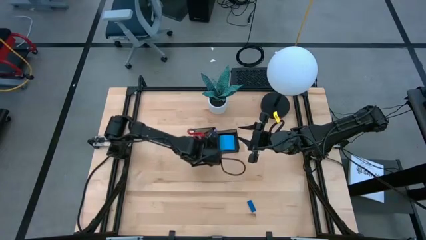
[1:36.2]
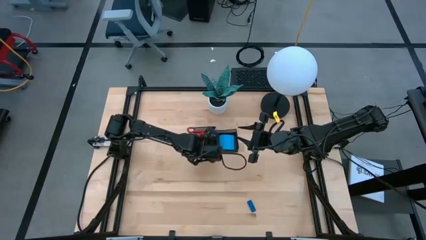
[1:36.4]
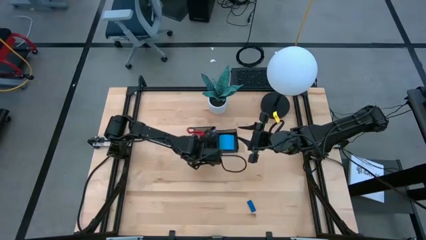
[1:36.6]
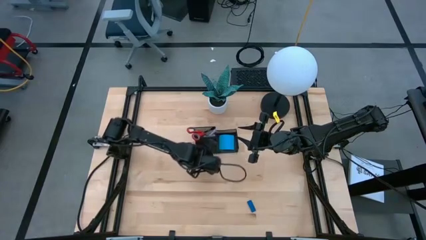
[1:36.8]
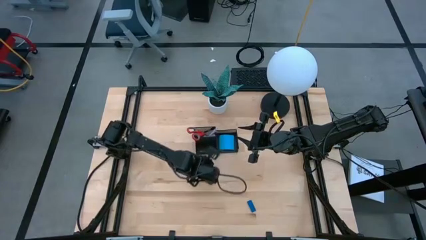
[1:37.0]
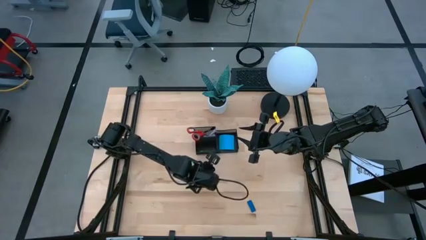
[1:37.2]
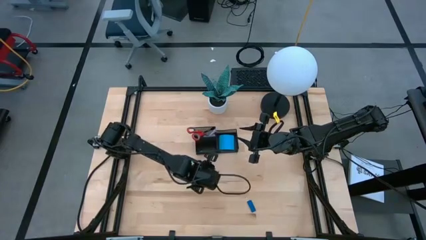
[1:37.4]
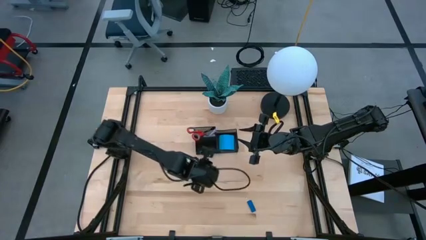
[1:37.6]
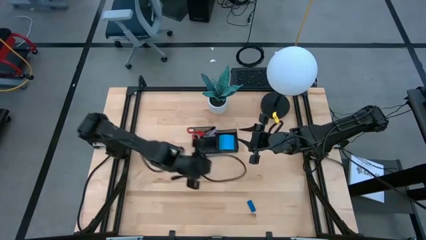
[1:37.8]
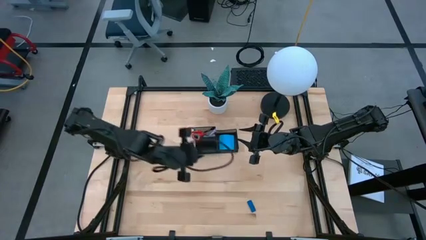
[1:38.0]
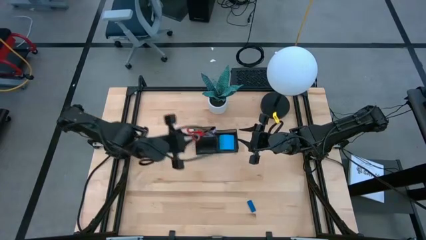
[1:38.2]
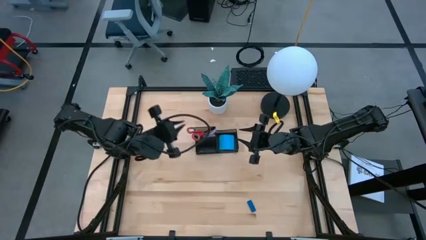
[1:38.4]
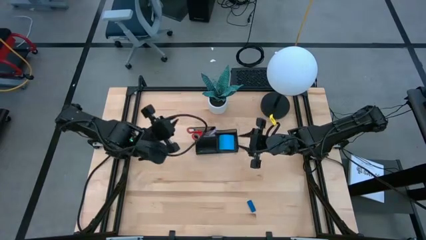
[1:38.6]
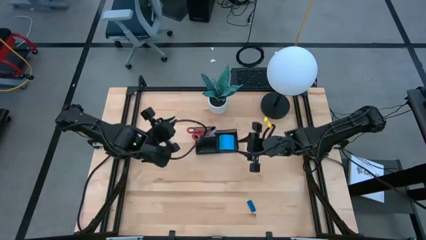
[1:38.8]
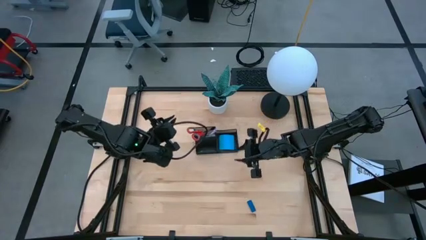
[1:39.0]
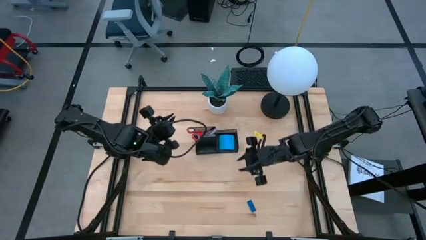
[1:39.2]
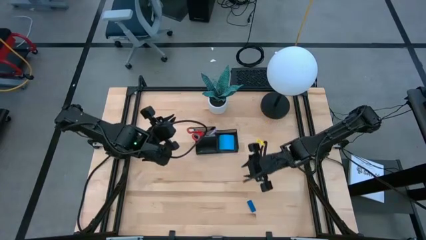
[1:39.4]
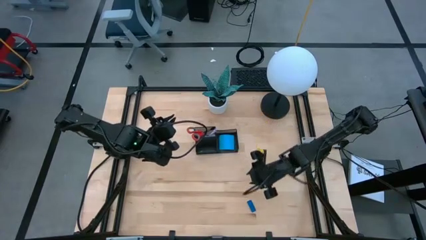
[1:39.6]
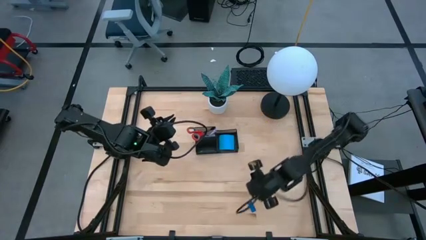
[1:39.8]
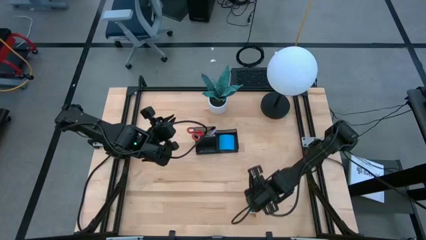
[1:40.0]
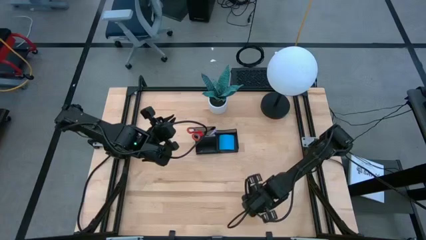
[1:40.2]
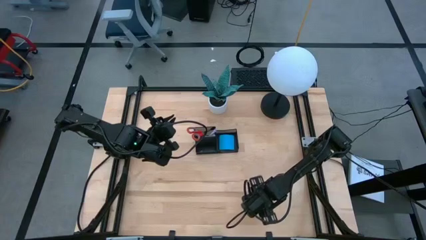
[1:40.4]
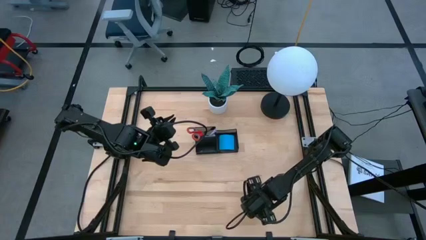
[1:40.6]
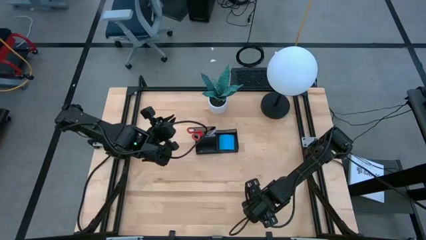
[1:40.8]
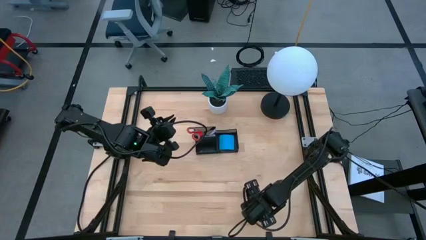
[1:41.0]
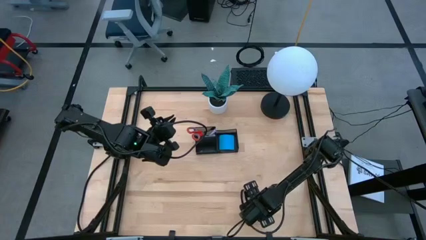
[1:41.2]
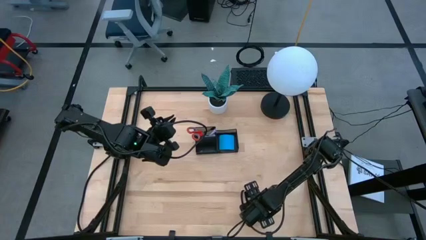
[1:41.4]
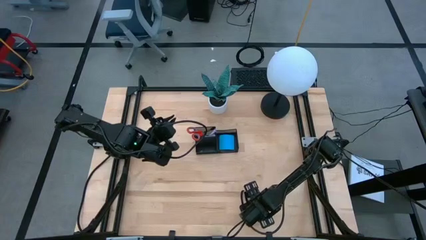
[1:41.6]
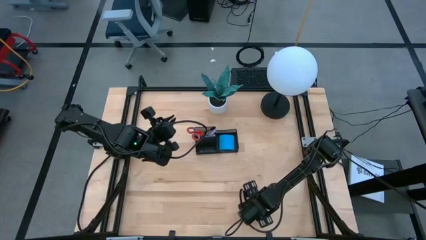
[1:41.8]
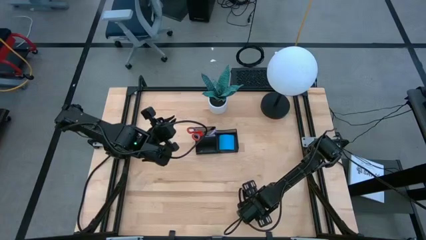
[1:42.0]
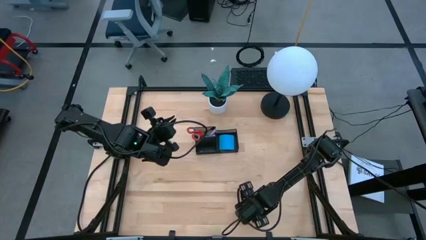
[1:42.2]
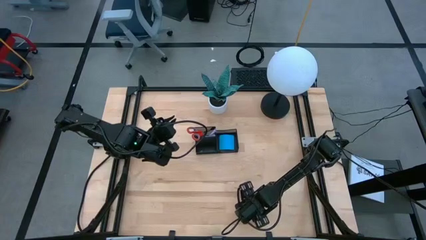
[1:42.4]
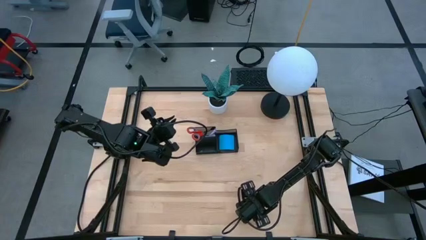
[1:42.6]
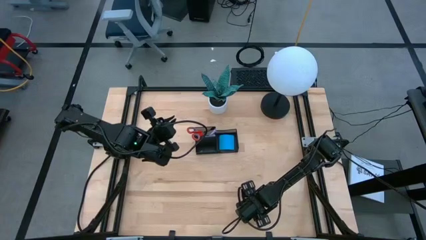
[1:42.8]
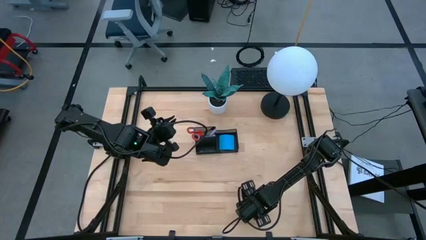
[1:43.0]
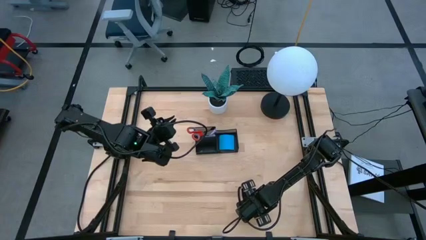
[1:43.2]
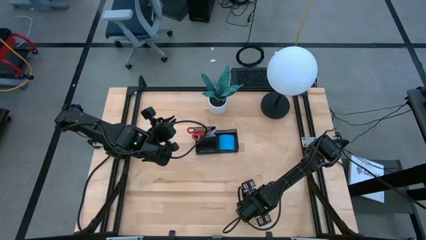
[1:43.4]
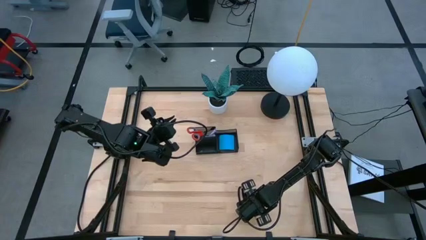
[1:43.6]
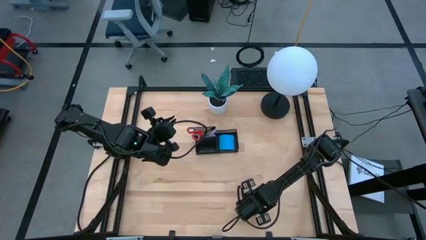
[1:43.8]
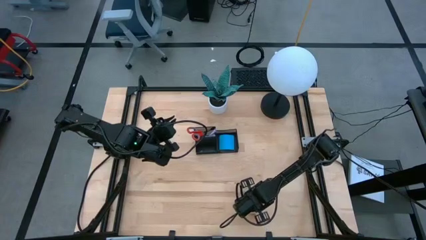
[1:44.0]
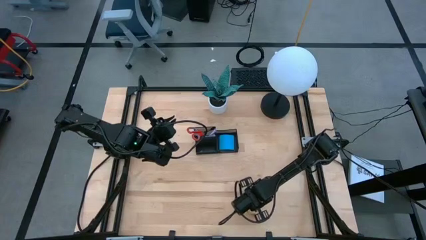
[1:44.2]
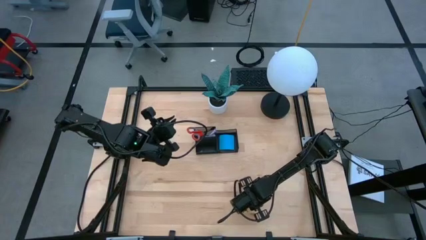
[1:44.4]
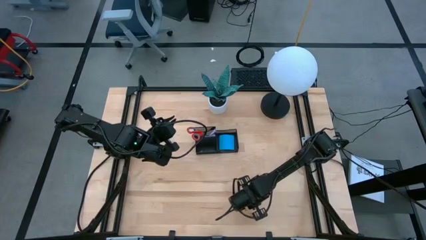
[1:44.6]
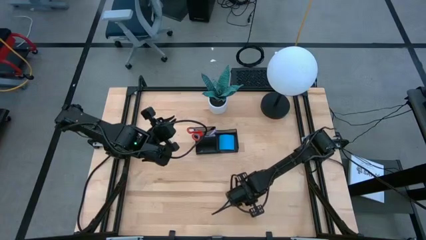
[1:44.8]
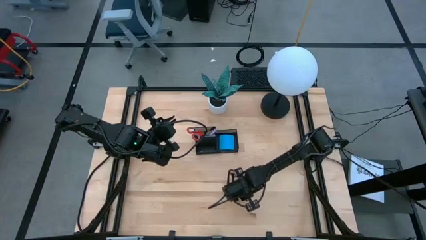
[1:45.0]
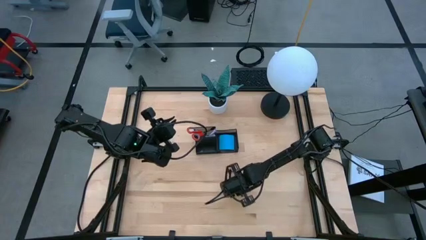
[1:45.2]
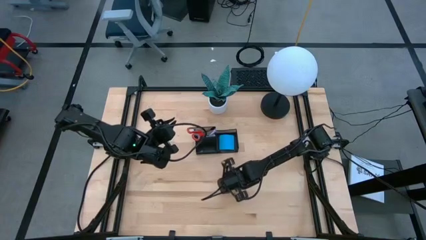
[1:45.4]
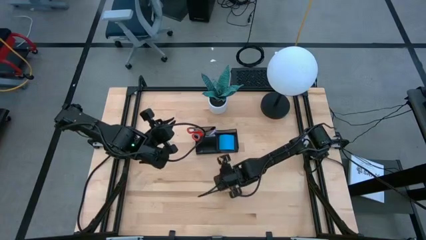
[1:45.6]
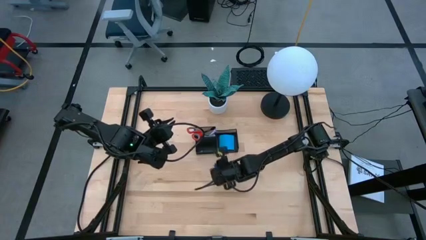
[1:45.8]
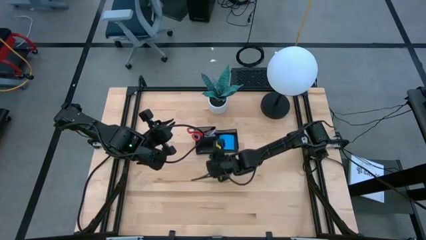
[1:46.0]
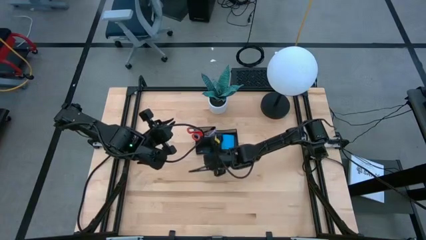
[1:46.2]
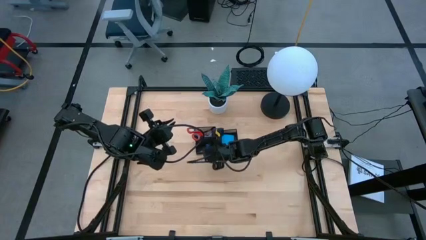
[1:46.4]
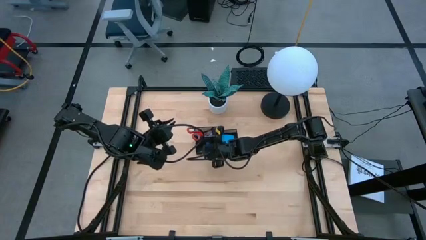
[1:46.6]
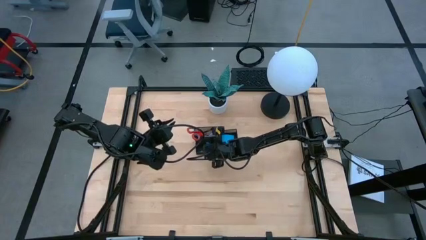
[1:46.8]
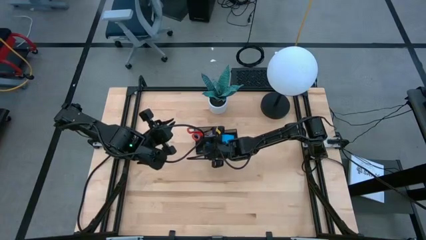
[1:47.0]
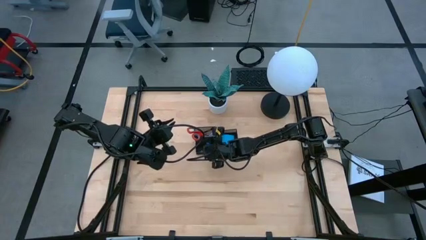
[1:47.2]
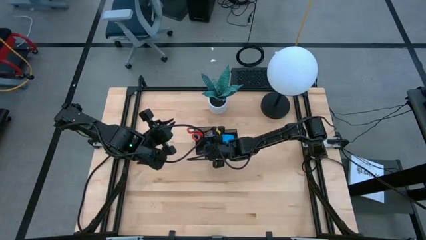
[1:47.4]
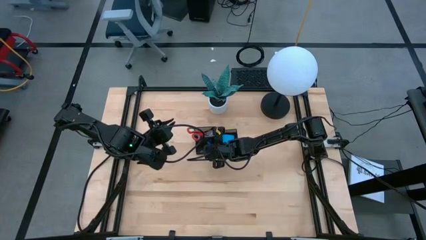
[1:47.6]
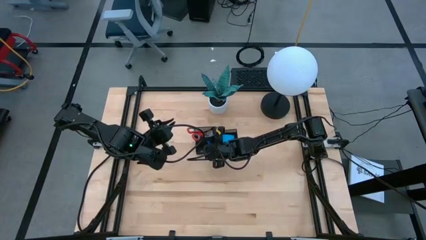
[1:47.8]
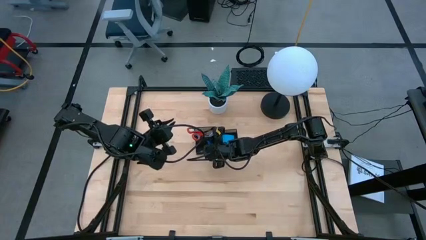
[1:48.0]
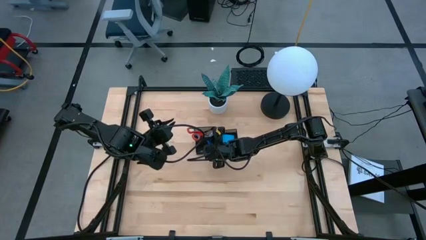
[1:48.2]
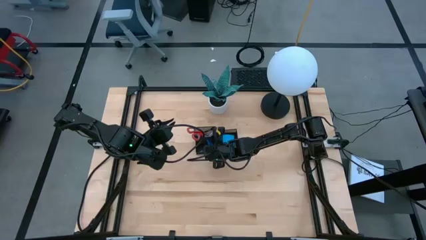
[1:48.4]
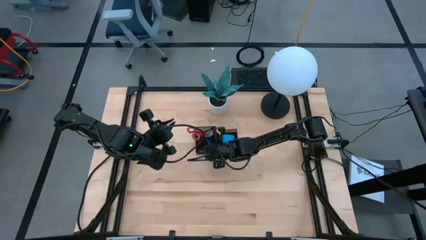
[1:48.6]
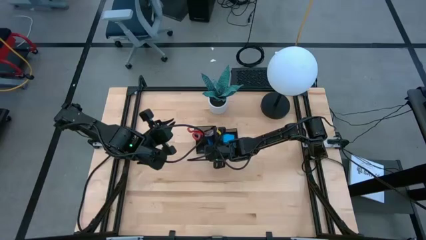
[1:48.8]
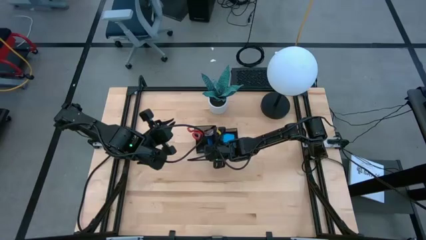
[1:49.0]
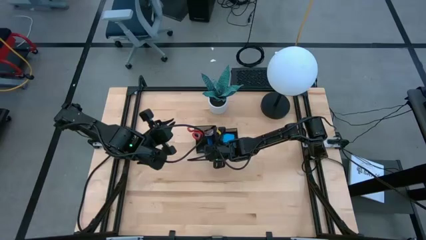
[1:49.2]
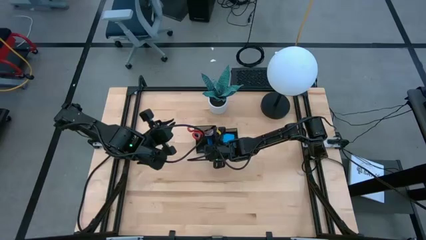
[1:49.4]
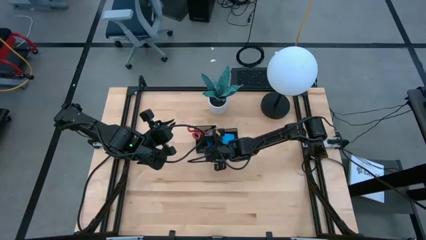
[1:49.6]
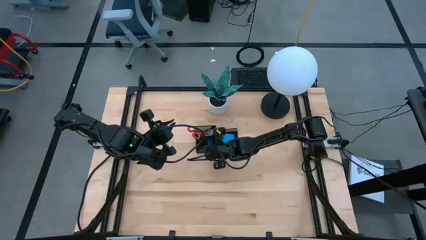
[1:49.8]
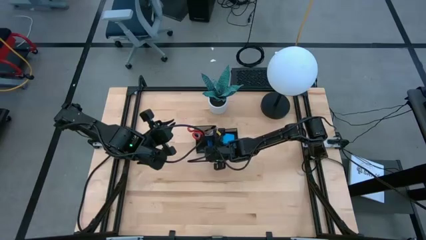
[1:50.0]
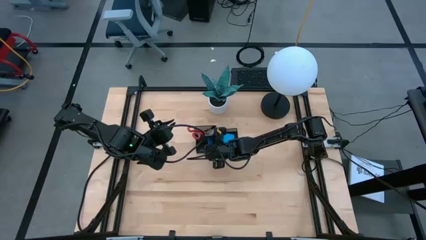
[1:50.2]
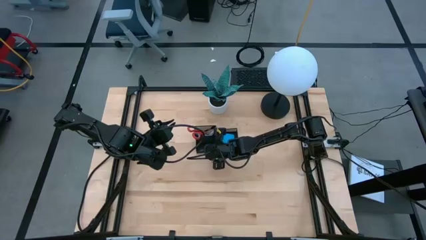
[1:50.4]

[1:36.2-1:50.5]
Task: Pick and place office supplies into organizer
Put the blue eraser into the bottom left section of the desk organizer
